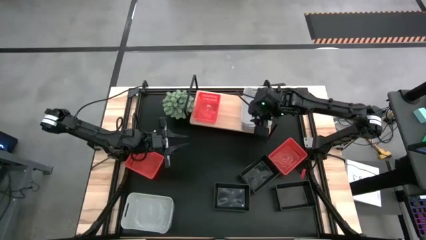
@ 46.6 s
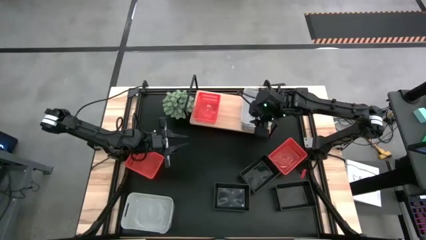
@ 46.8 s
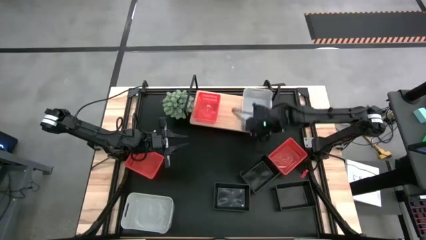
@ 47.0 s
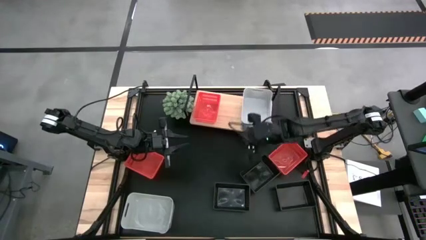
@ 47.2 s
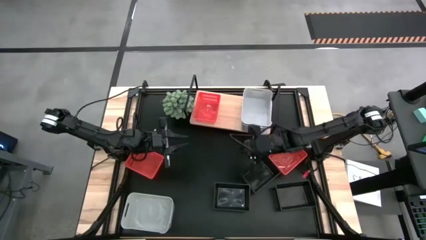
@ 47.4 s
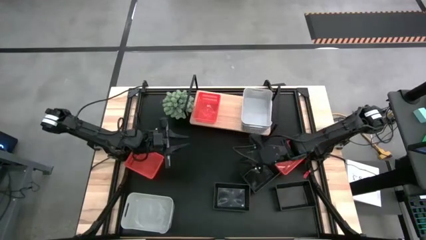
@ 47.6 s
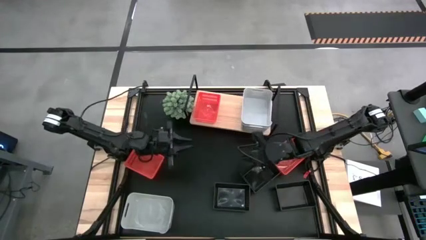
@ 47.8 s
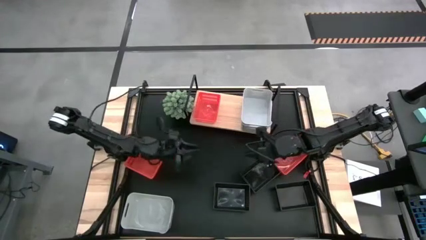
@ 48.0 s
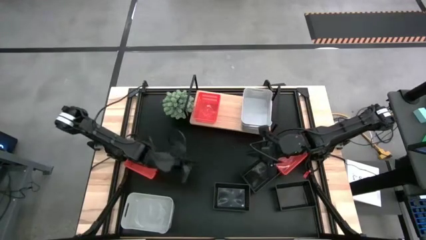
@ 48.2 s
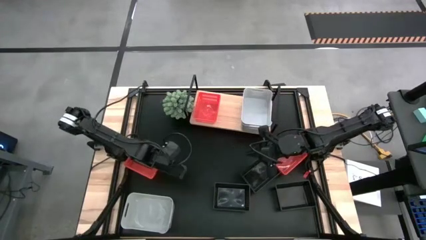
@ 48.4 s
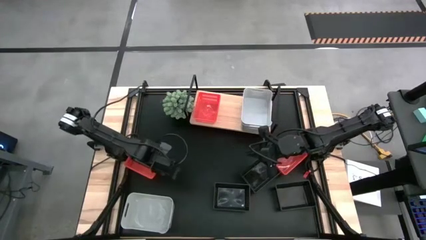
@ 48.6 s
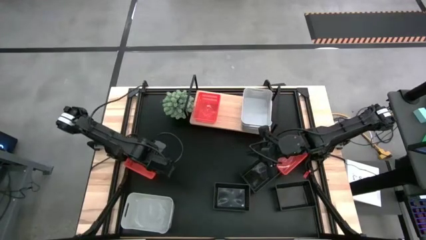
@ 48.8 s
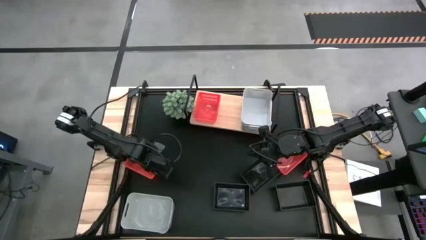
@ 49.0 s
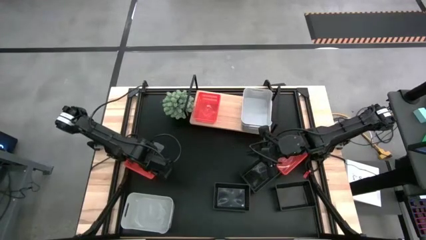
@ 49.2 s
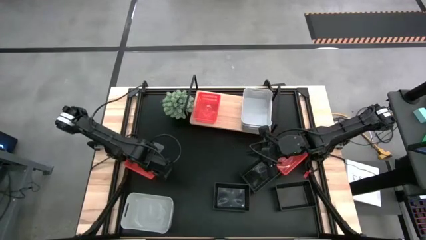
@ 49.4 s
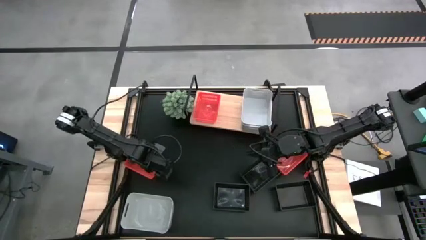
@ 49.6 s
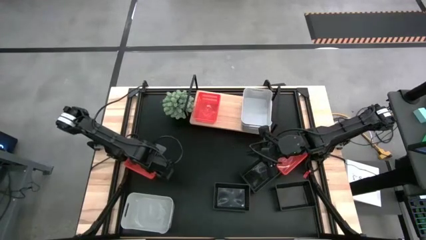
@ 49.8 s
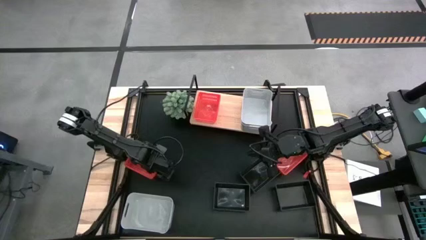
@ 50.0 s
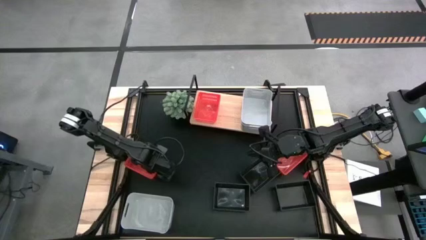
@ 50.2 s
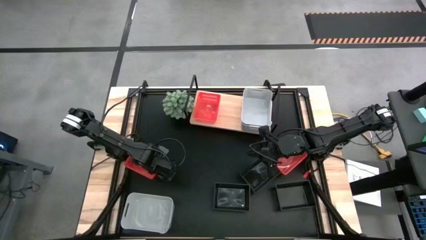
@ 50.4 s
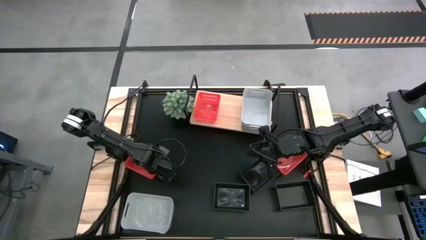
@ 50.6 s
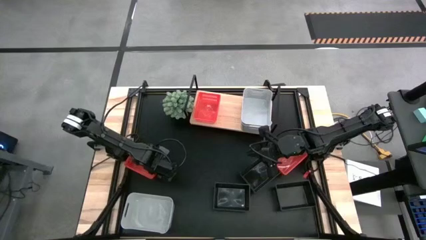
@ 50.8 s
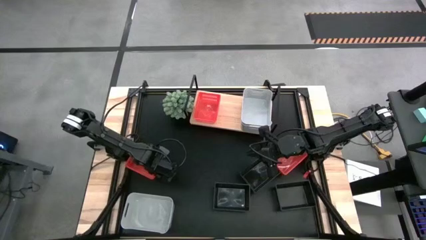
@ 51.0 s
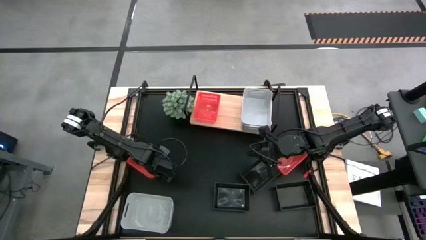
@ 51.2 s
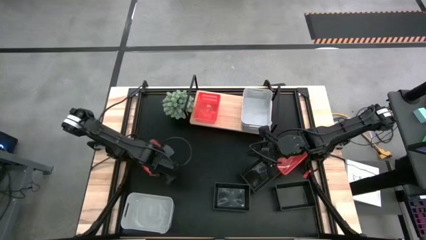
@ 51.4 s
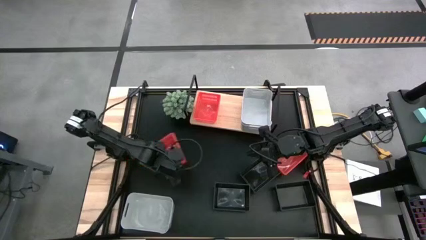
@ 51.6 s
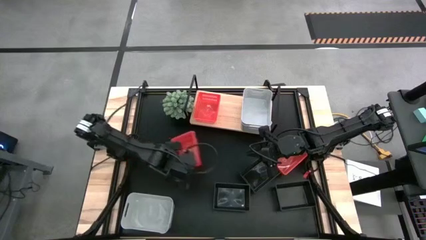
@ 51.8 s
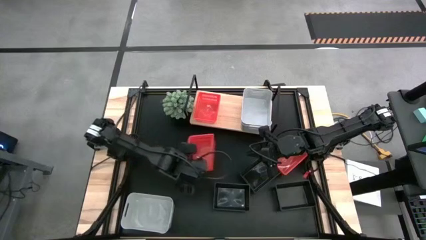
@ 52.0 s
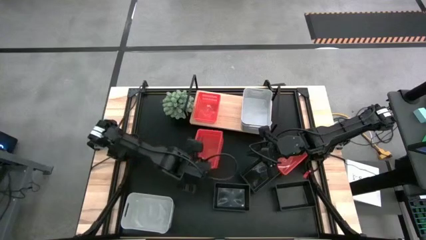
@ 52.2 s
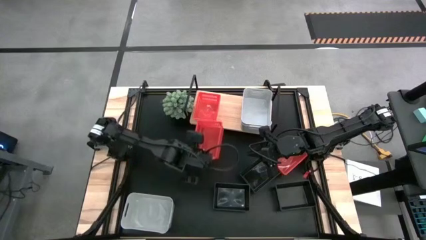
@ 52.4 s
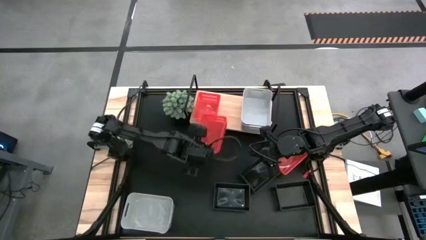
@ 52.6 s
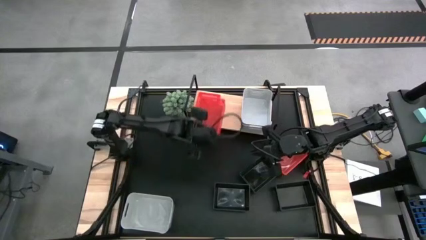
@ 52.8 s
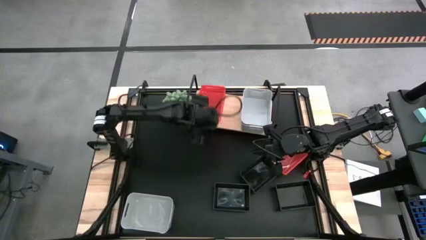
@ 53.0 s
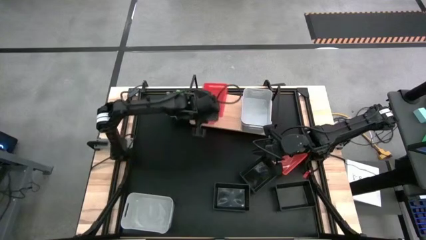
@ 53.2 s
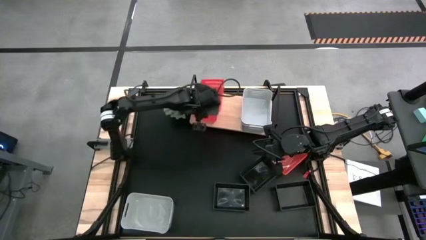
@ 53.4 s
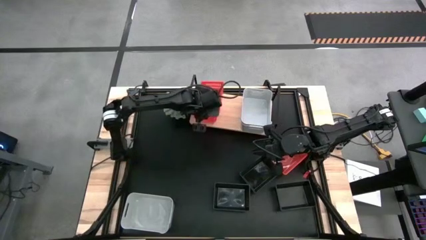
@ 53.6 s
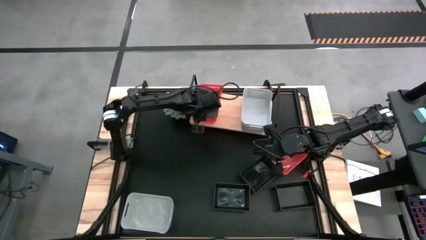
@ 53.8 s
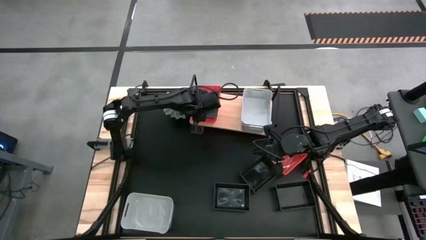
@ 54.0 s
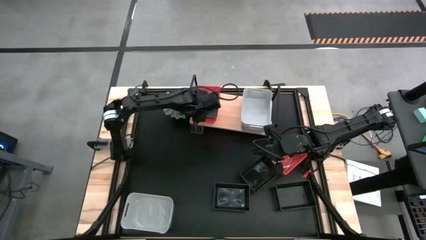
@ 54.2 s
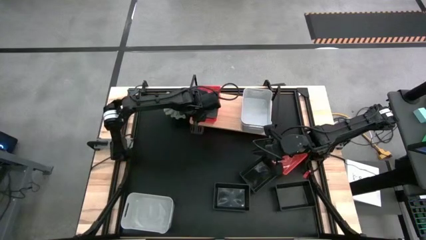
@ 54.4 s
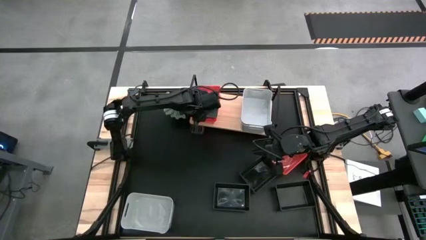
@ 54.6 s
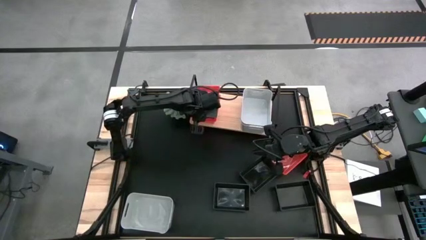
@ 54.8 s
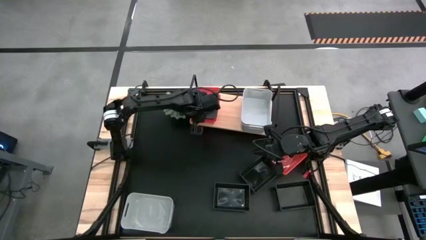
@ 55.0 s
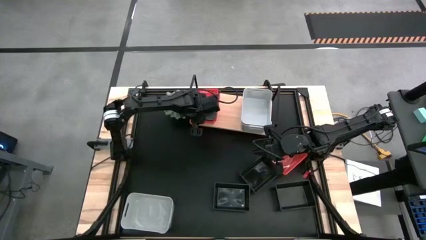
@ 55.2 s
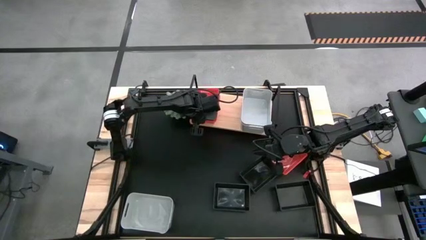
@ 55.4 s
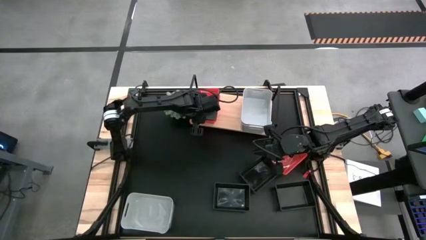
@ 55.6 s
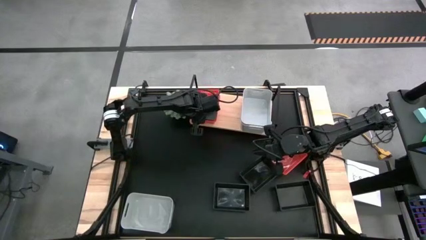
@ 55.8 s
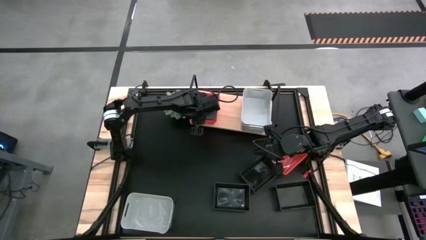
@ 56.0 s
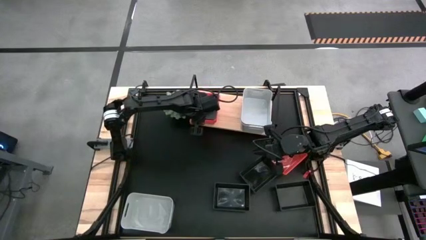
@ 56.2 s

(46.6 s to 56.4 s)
Task: Stack baskets on shelf by color
Stack the left red basket on top of the red basket on the shelf

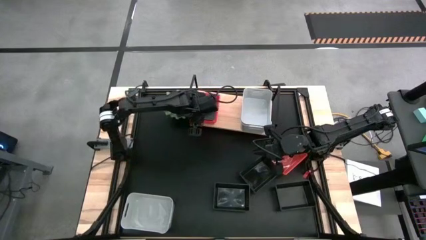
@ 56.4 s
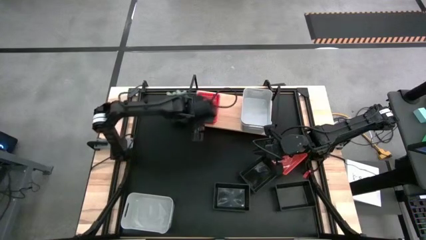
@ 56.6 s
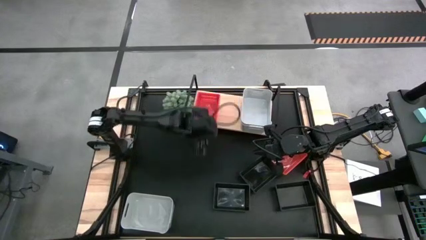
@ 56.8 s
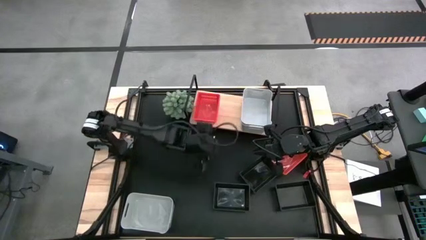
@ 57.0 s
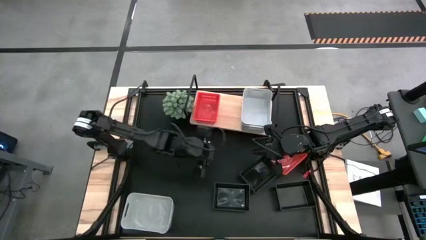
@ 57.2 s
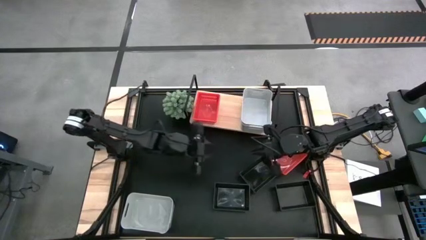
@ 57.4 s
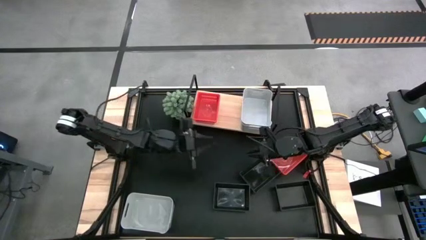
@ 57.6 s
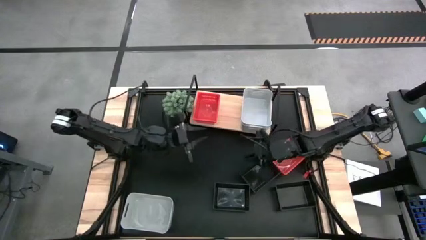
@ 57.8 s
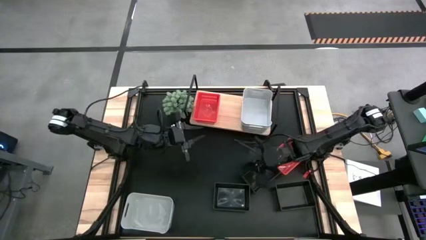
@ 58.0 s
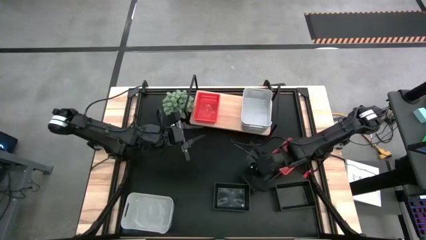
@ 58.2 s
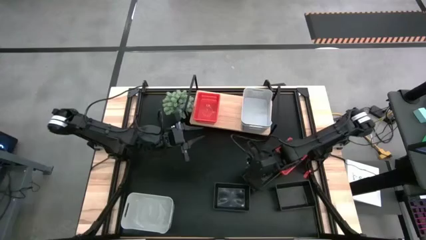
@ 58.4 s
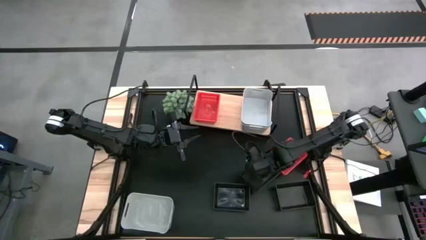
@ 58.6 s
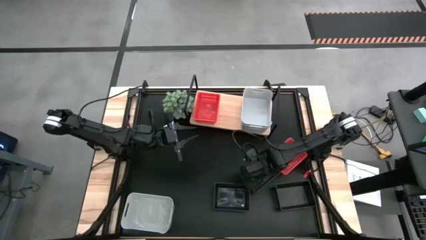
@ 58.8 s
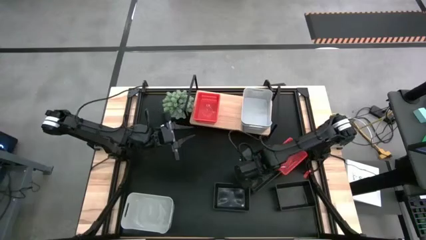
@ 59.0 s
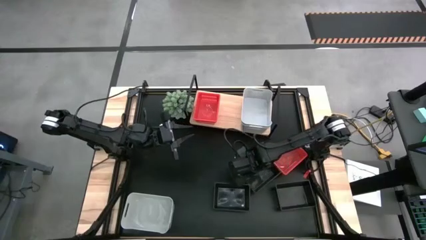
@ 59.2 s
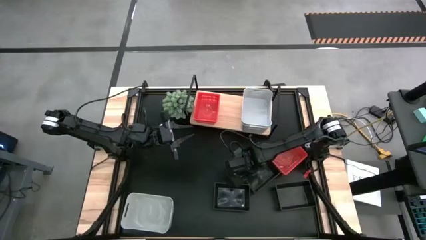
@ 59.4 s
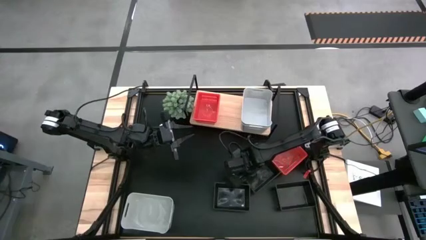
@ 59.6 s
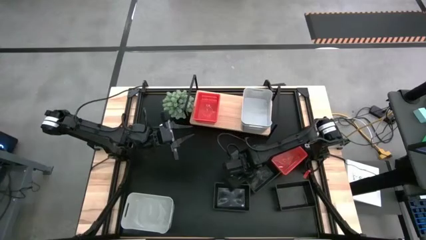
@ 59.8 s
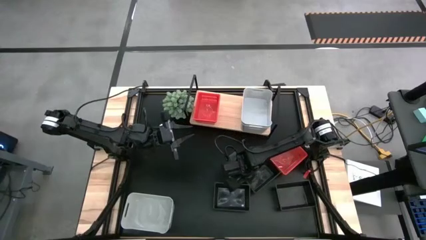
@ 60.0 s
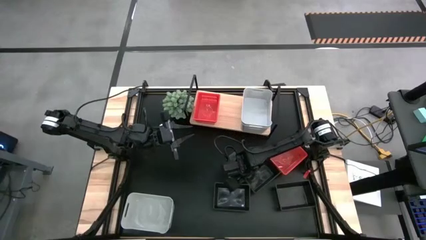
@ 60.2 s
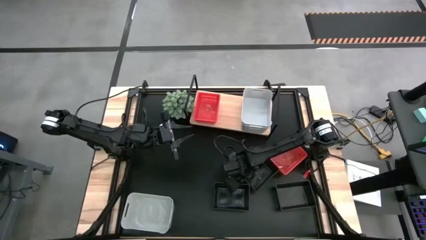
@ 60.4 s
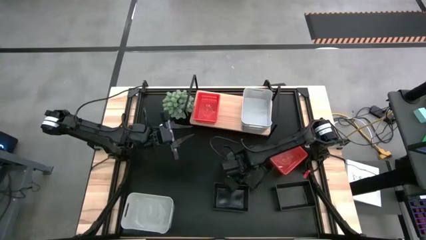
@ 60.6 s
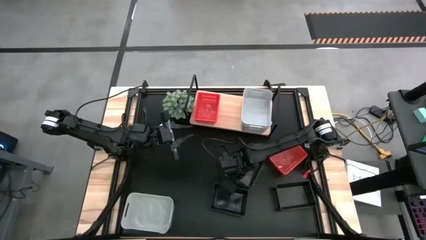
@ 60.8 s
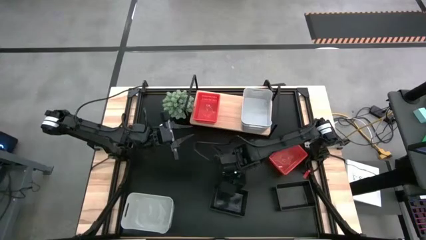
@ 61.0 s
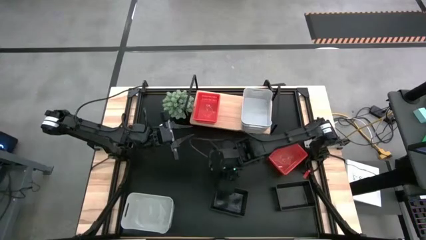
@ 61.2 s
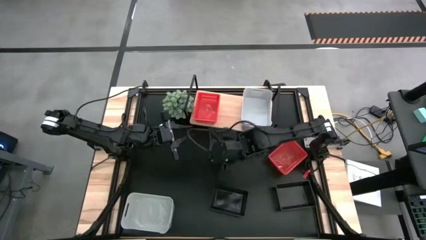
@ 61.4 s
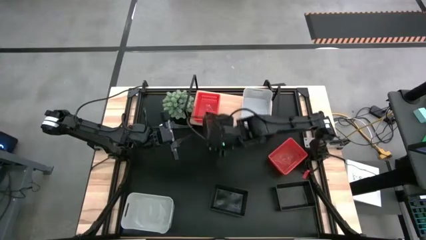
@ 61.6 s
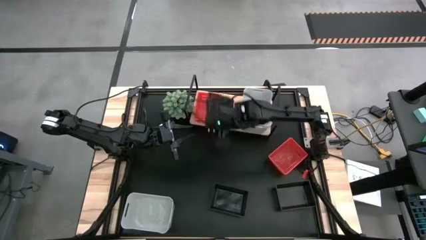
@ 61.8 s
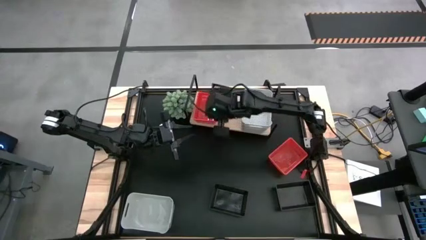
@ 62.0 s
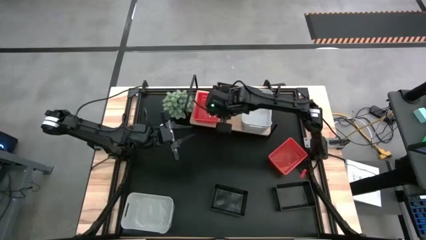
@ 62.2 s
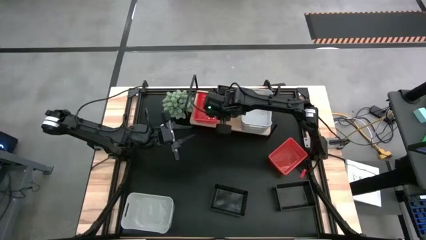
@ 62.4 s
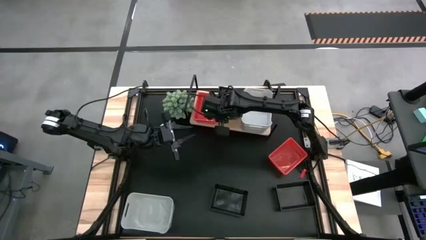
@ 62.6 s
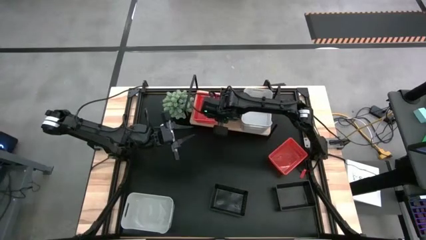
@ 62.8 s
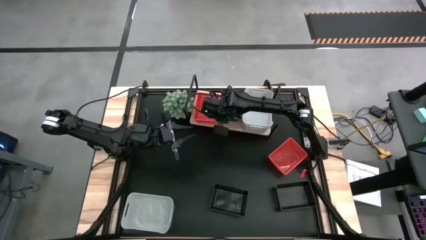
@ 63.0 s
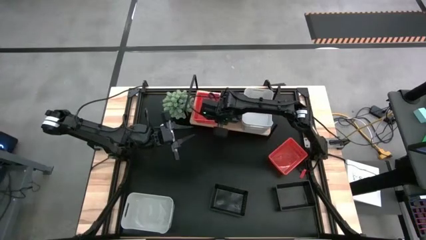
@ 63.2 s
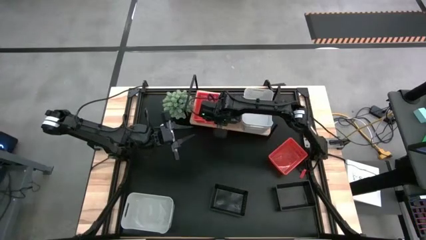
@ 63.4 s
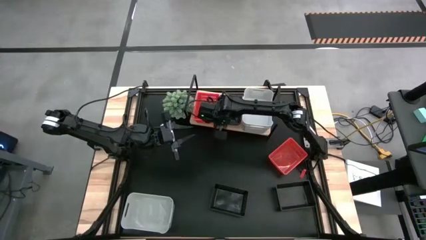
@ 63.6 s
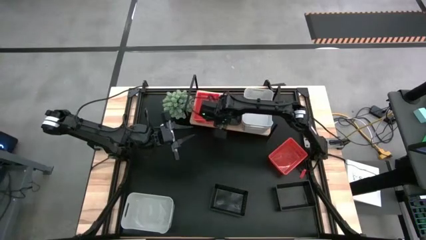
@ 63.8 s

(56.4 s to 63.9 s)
Put the top black basket on the shelf
